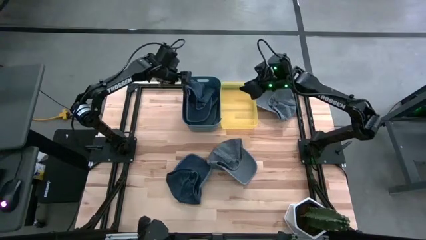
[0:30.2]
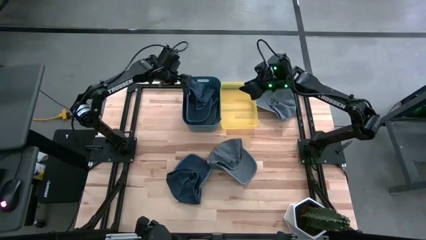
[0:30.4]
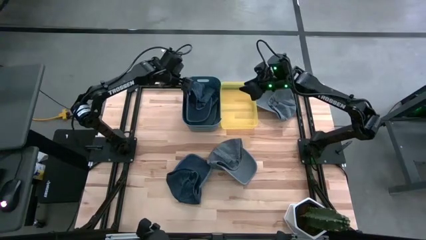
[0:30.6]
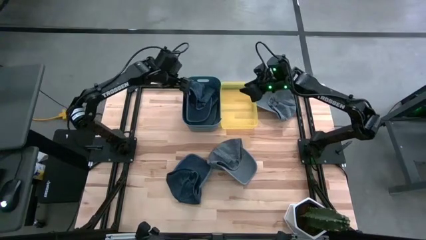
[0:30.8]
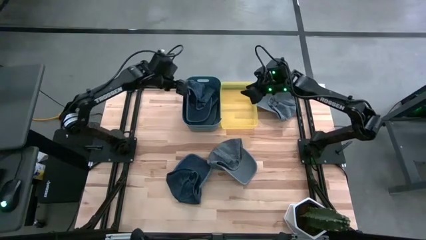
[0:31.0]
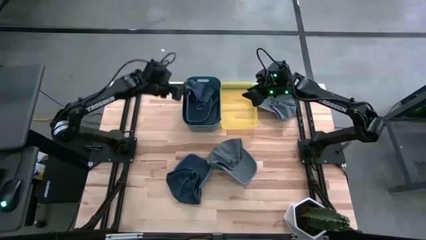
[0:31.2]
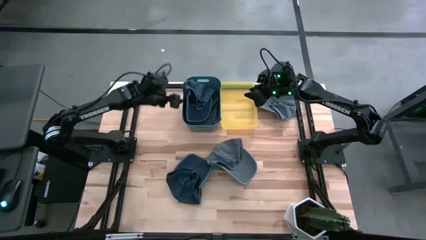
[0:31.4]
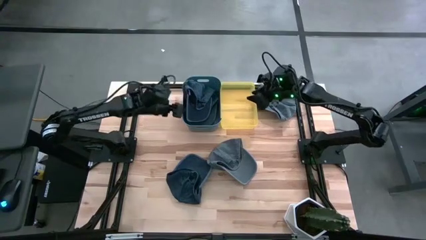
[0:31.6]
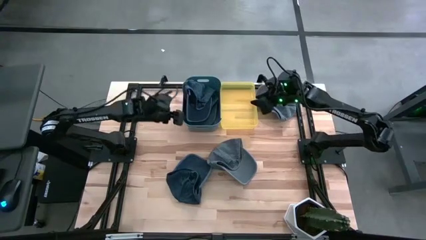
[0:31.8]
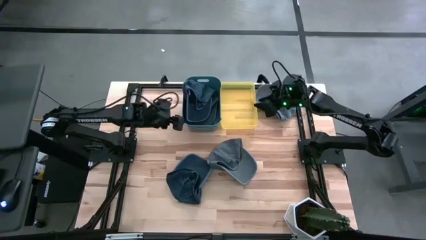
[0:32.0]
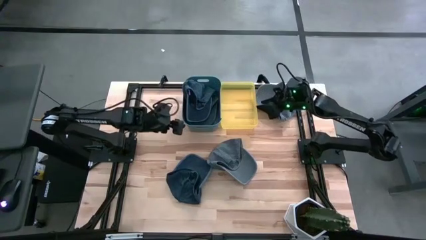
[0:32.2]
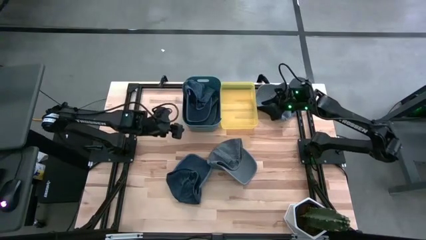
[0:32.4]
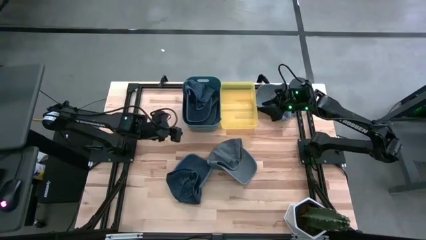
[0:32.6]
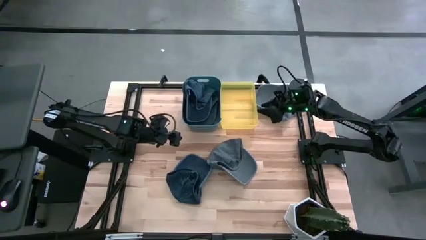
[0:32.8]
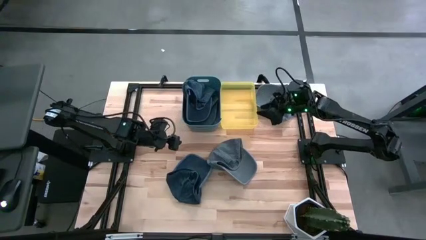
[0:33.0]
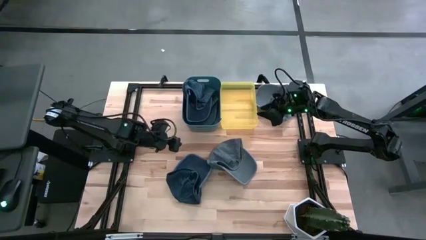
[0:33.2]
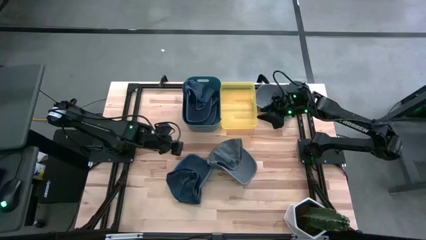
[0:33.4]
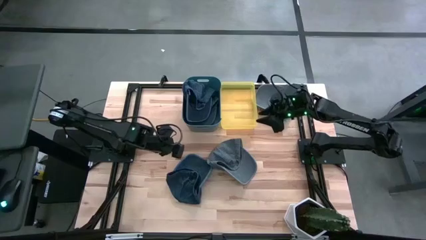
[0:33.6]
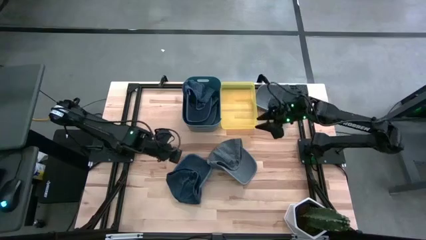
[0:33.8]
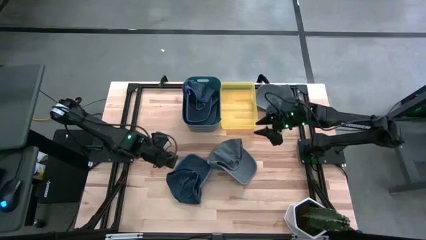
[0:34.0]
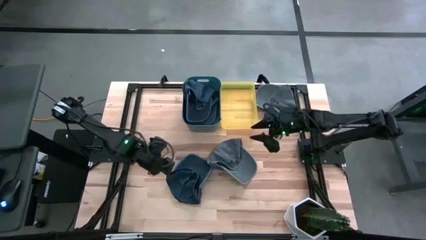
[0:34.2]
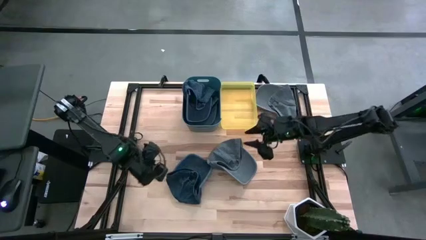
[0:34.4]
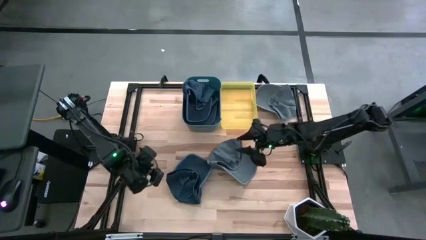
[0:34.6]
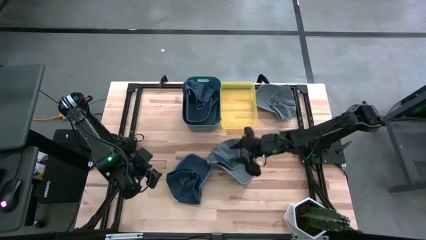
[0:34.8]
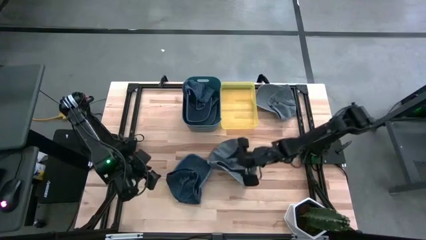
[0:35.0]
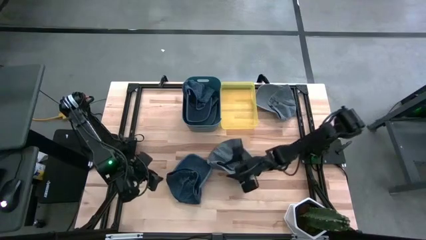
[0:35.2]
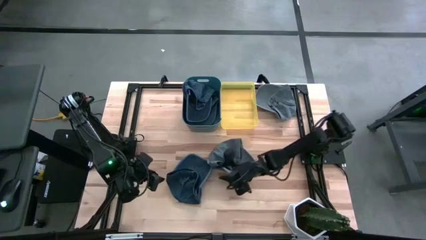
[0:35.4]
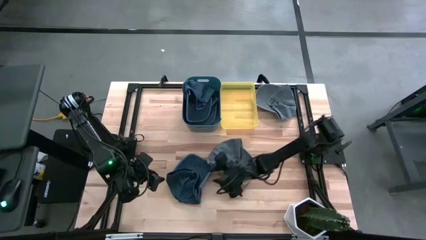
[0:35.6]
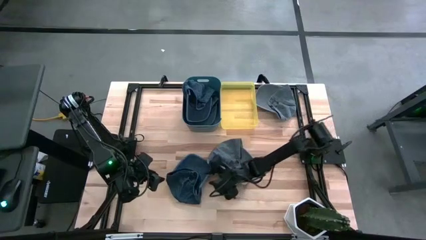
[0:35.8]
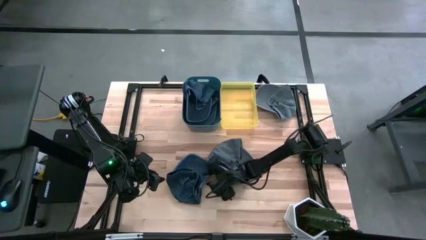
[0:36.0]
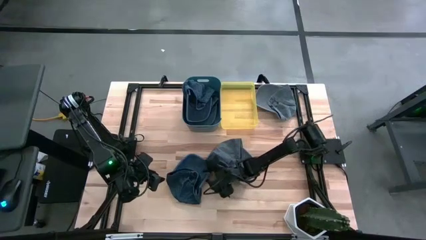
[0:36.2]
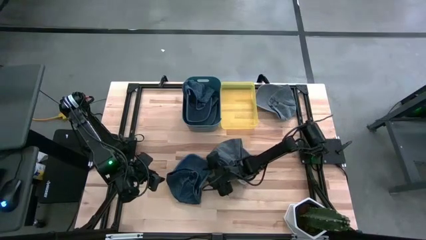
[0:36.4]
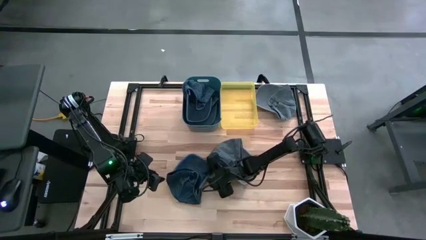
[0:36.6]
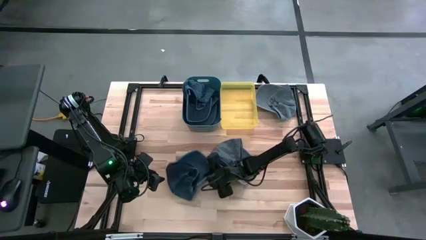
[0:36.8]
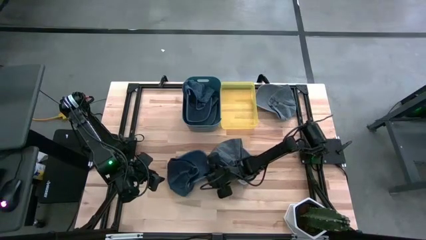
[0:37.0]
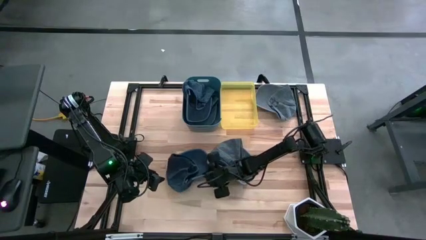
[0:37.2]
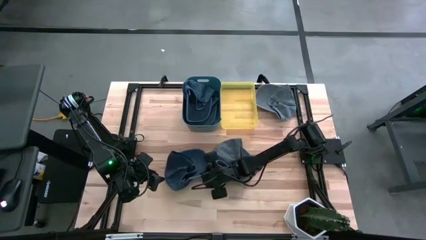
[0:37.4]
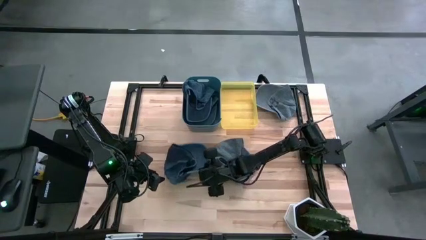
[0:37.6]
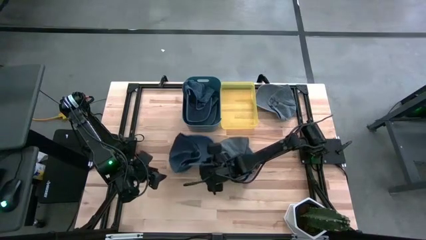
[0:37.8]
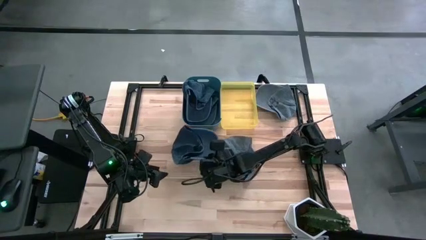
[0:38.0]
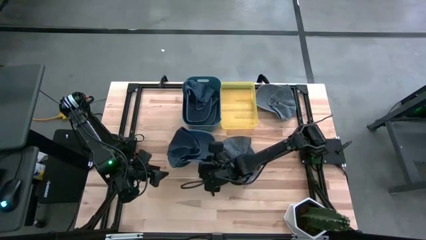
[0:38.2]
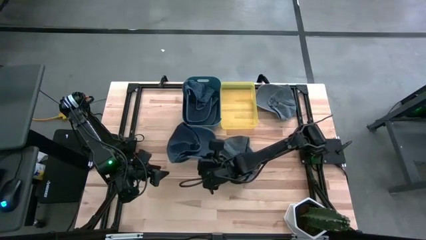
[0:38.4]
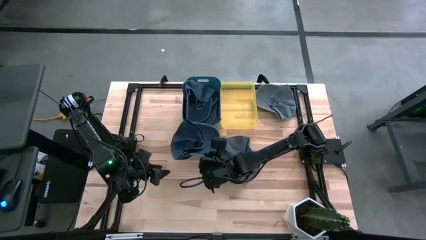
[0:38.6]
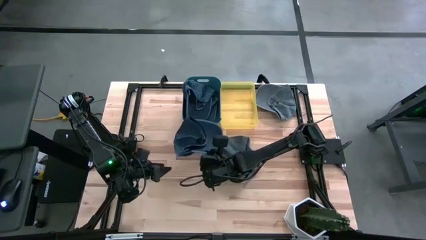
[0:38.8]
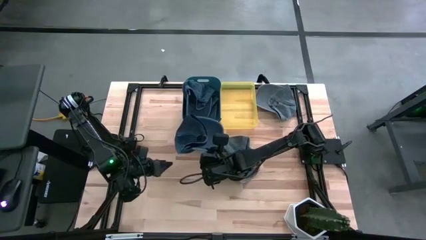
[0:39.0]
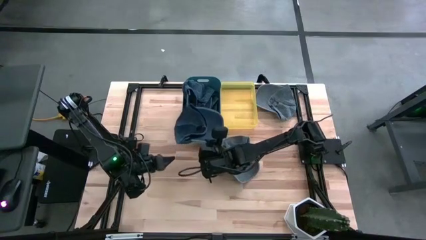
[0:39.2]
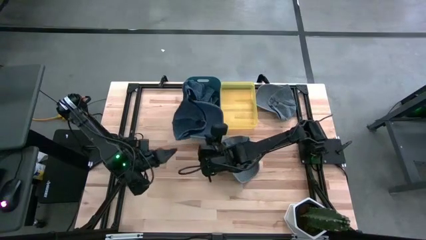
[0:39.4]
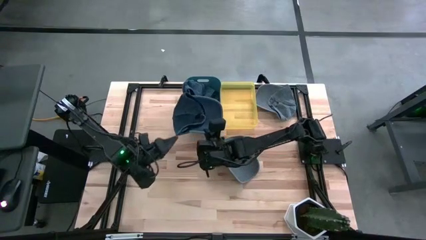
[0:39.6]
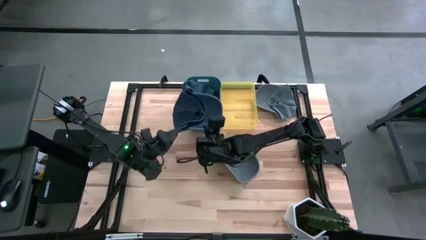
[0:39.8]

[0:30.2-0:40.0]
Task: Pick & Place hat
Put the black cap into the blue bin

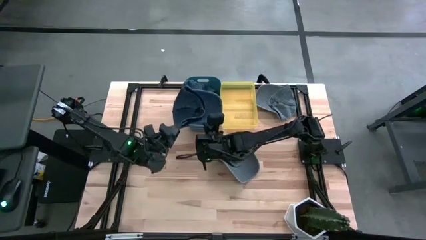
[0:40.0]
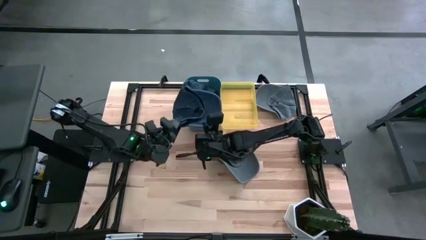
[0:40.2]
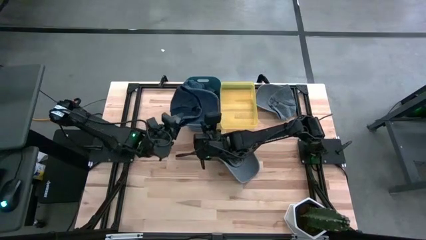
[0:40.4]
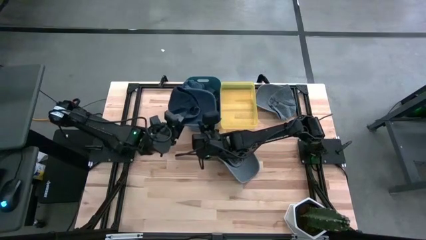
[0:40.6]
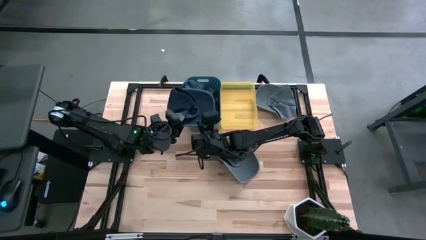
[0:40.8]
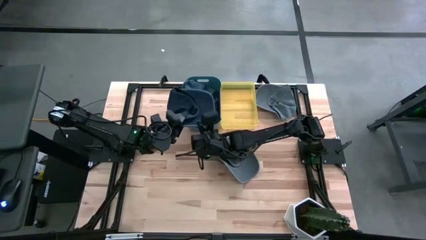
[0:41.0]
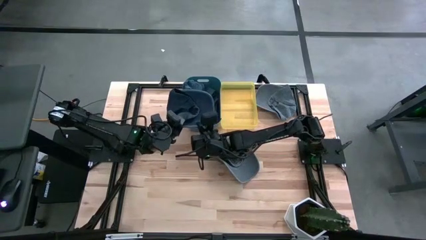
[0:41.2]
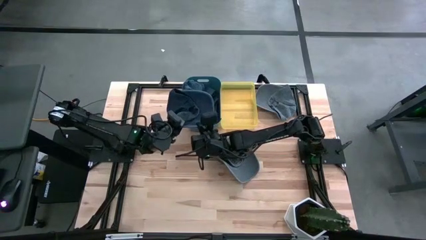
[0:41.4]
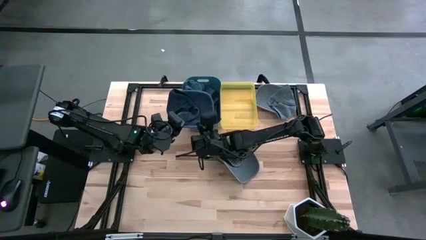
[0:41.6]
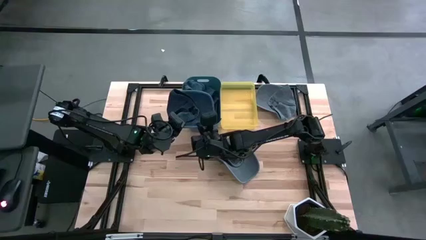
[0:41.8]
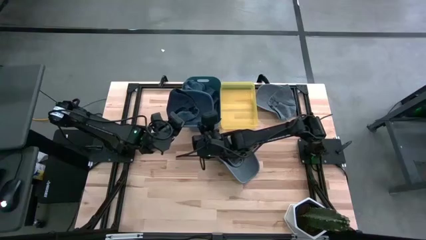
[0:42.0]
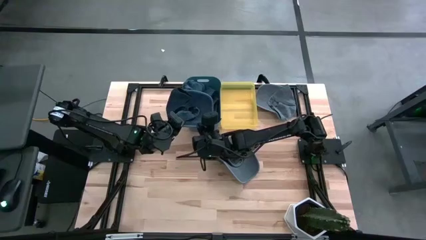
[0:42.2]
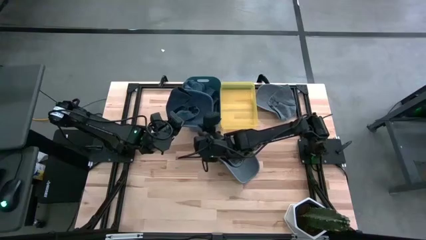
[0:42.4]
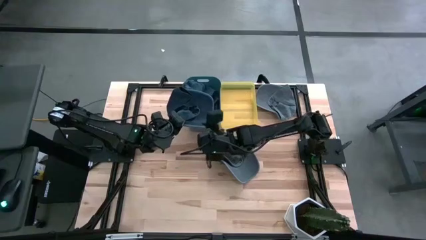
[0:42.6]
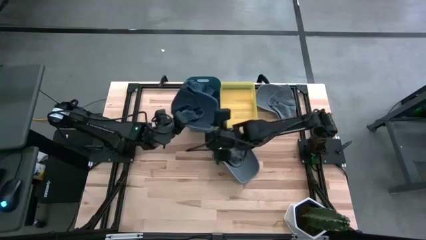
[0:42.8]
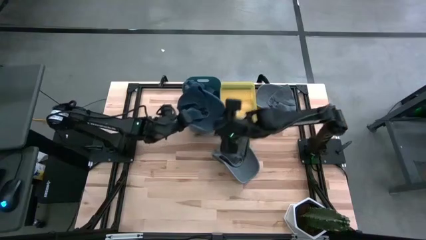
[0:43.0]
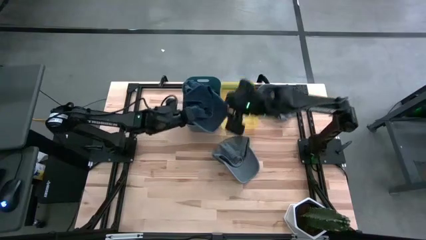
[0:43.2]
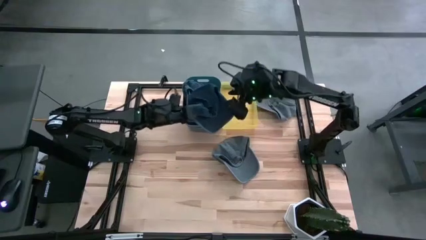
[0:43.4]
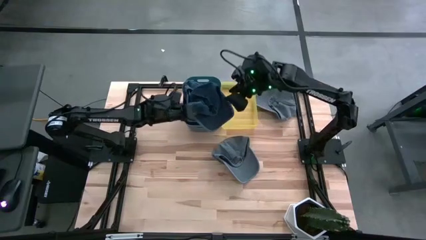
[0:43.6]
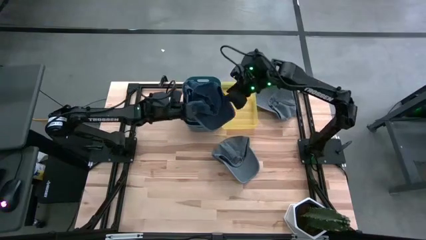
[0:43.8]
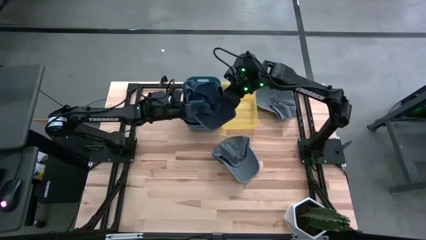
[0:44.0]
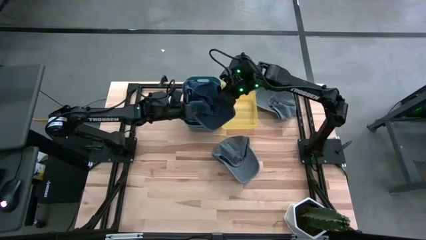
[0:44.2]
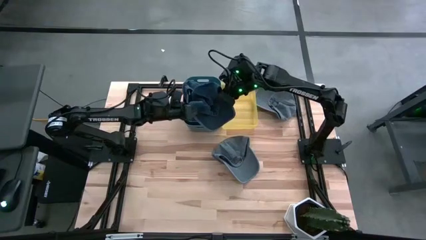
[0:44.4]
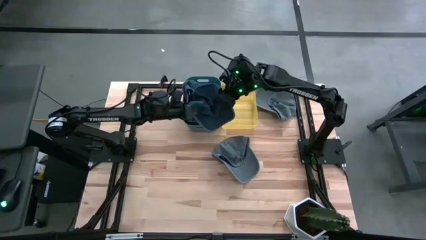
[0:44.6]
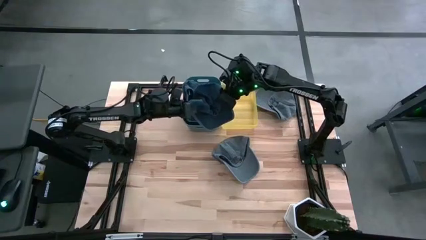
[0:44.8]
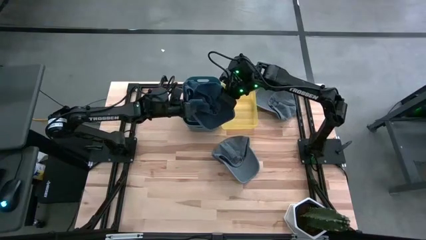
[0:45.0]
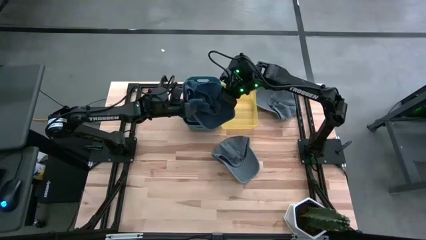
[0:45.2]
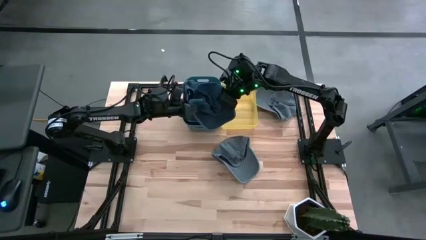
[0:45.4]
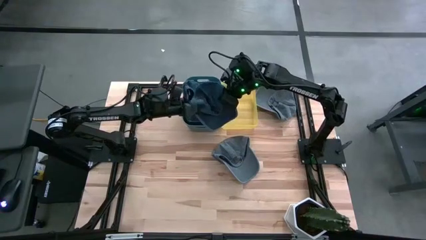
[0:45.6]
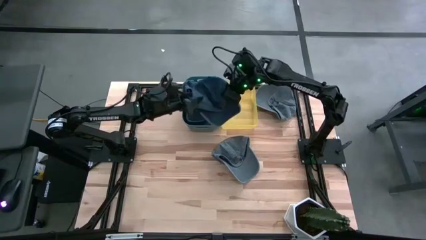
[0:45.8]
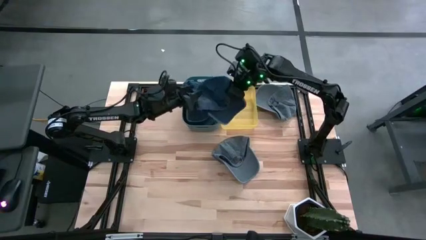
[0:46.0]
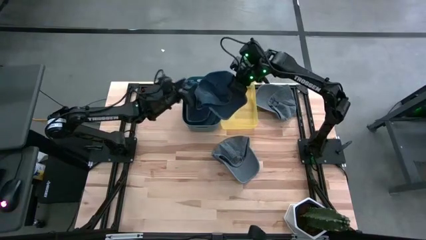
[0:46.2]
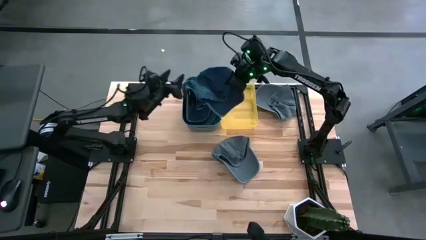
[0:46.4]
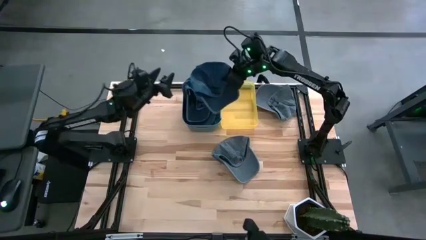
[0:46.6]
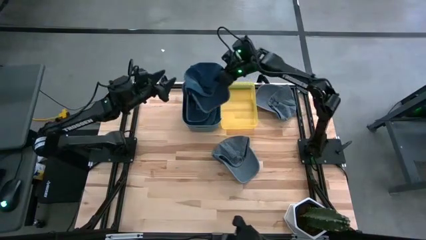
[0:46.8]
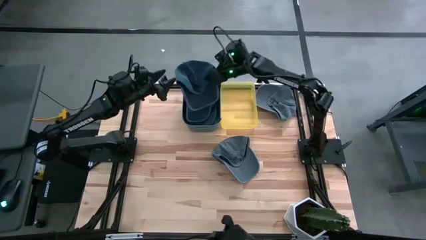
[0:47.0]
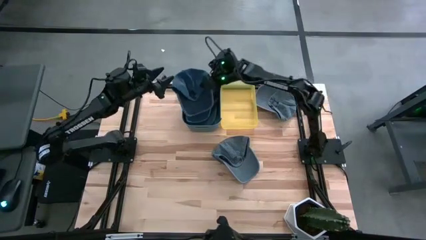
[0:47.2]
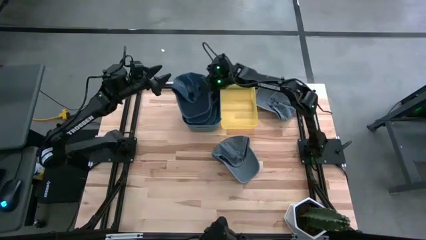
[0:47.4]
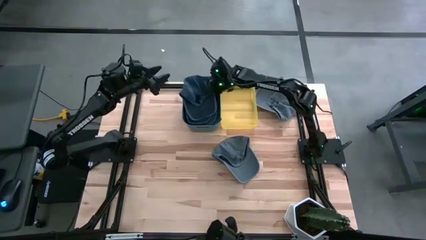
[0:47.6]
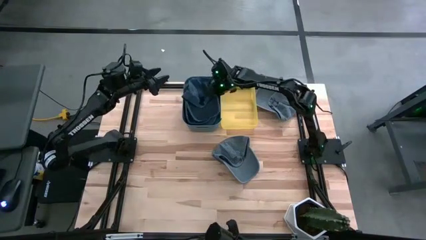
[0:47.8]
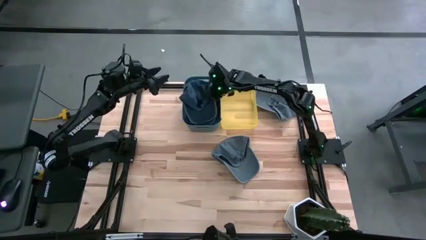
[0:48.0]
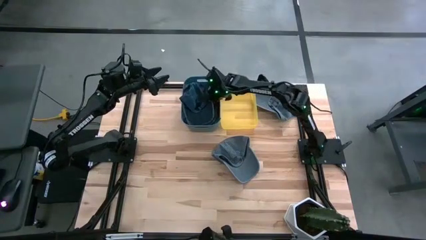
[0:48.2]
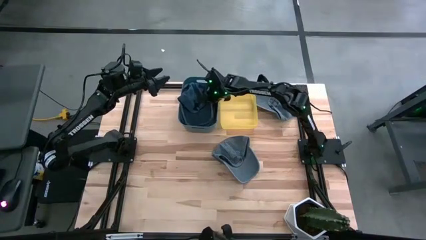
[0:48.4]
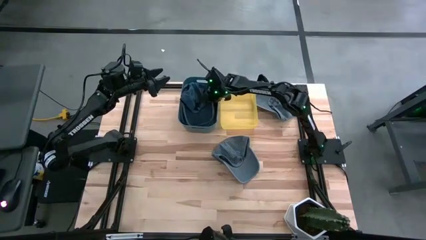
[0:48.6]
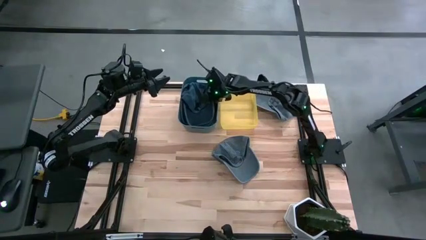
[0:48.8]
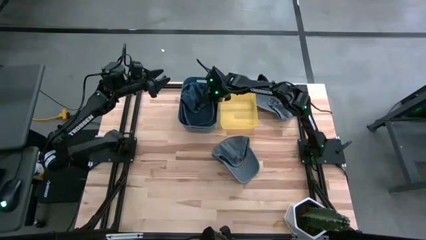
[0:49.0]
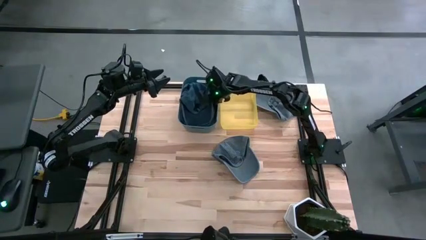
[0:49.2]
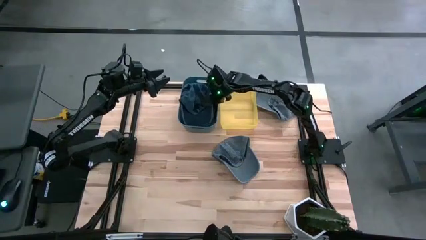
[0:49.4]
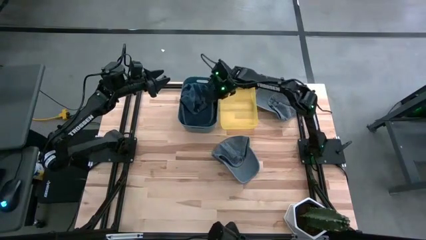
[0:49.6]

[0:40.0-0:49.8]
Put the black cap into the blue bin
